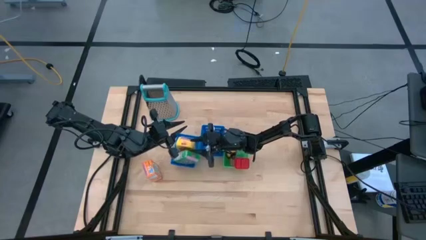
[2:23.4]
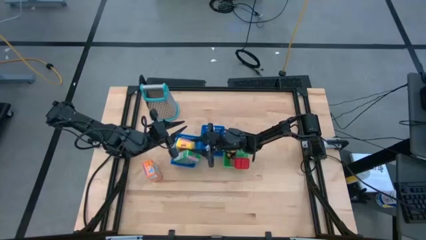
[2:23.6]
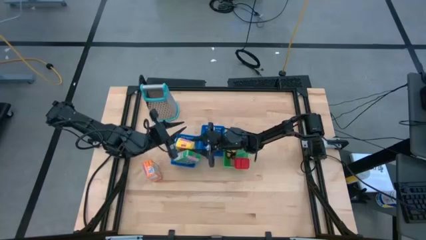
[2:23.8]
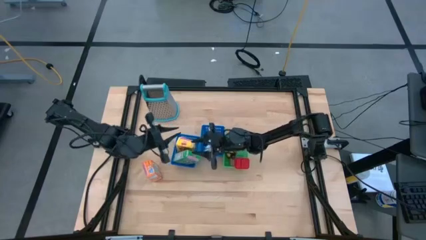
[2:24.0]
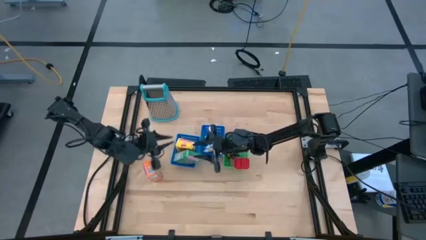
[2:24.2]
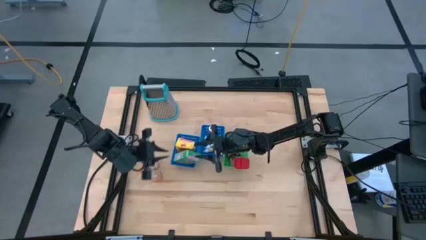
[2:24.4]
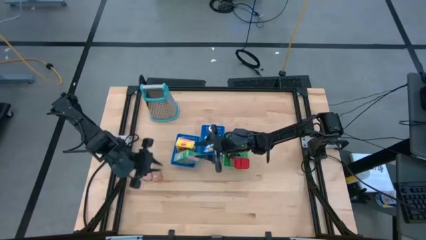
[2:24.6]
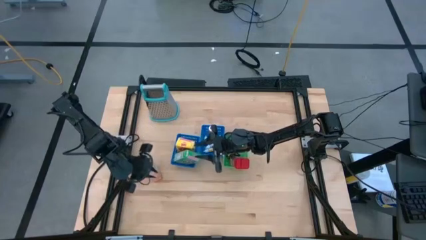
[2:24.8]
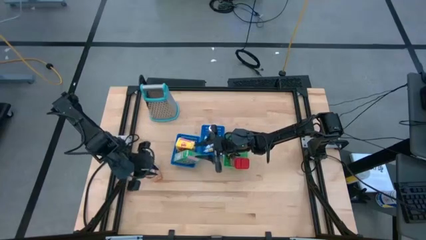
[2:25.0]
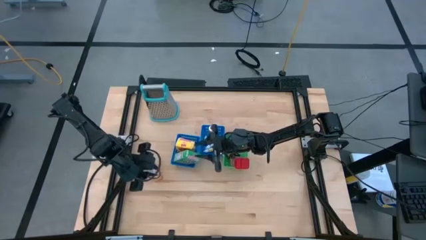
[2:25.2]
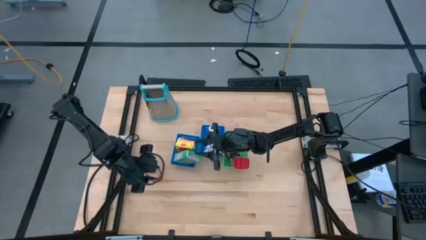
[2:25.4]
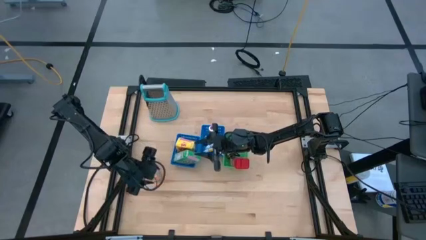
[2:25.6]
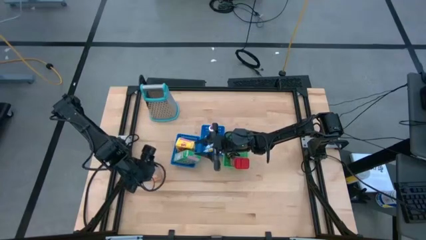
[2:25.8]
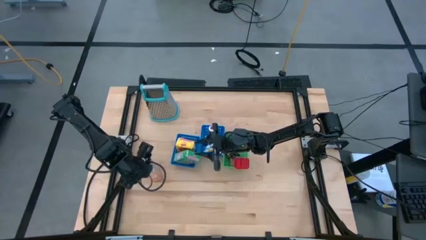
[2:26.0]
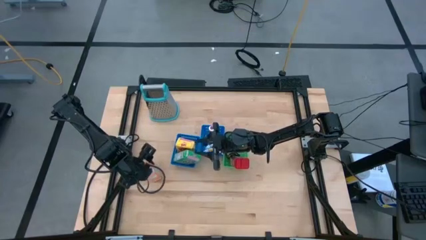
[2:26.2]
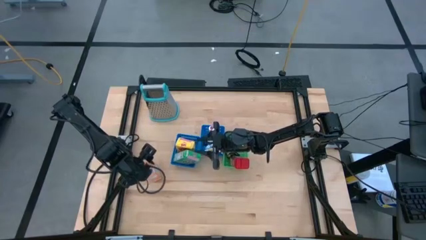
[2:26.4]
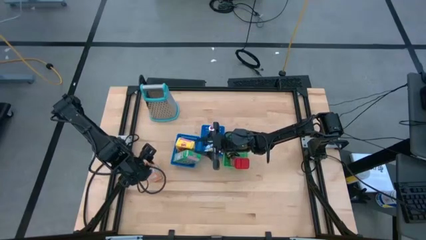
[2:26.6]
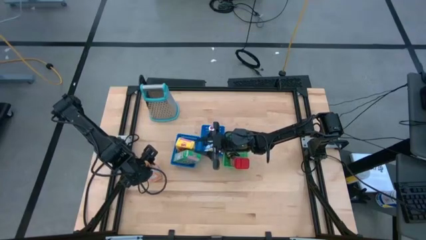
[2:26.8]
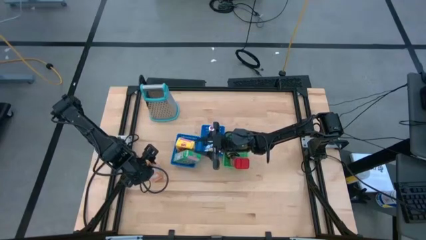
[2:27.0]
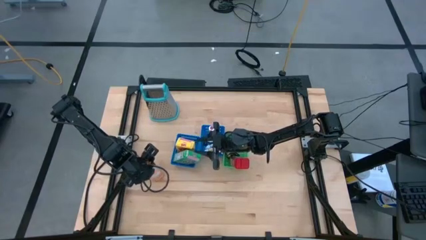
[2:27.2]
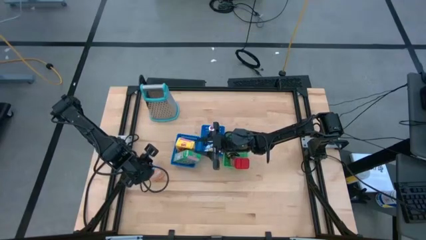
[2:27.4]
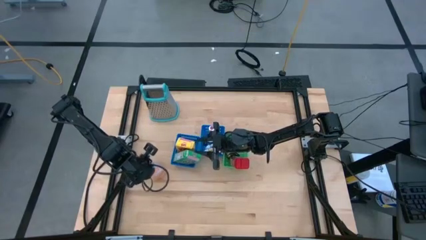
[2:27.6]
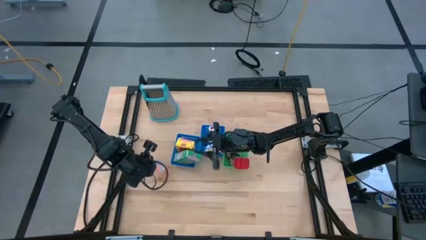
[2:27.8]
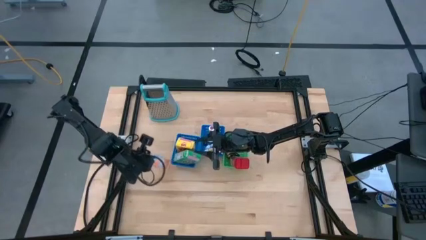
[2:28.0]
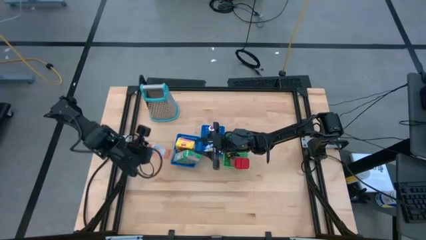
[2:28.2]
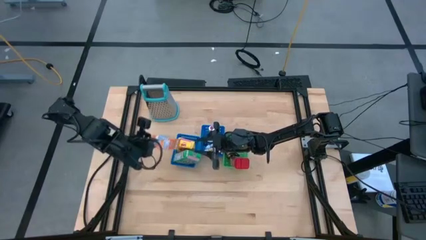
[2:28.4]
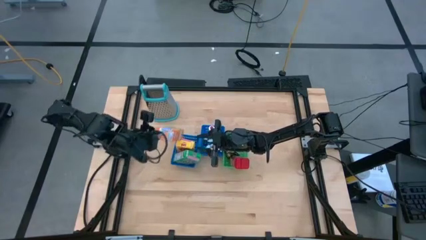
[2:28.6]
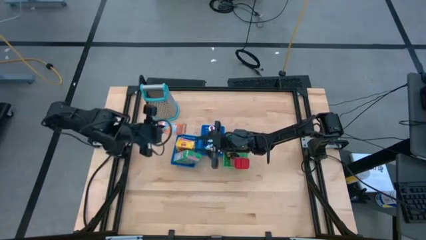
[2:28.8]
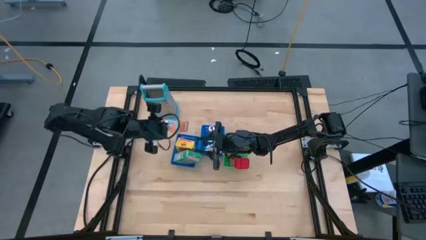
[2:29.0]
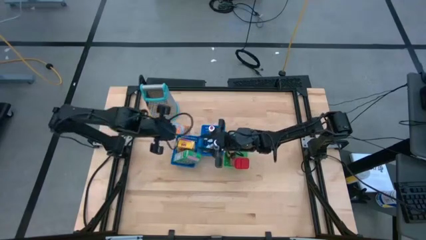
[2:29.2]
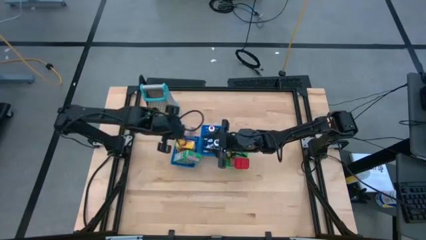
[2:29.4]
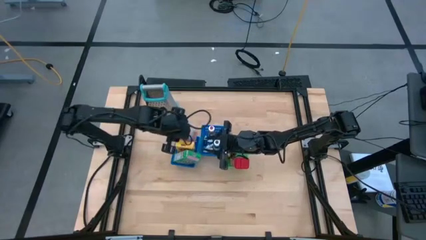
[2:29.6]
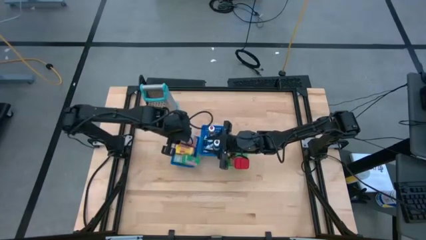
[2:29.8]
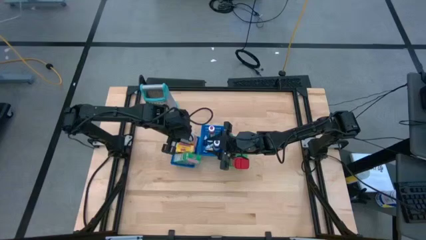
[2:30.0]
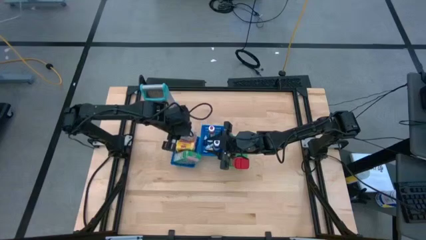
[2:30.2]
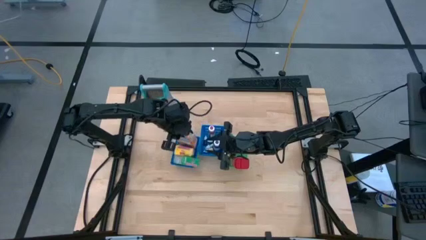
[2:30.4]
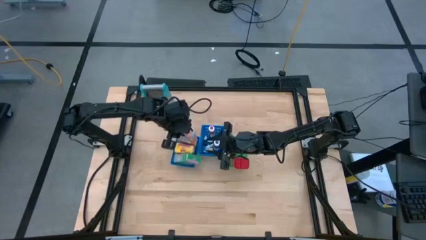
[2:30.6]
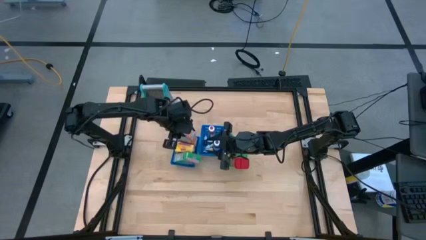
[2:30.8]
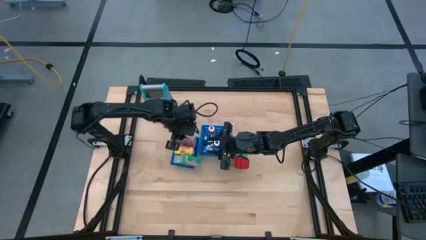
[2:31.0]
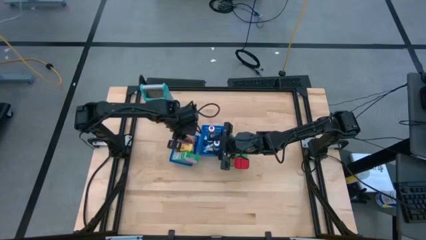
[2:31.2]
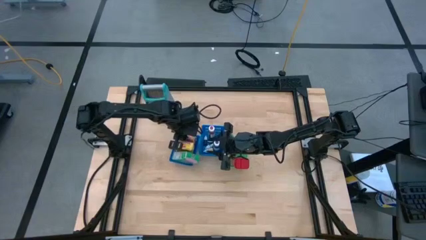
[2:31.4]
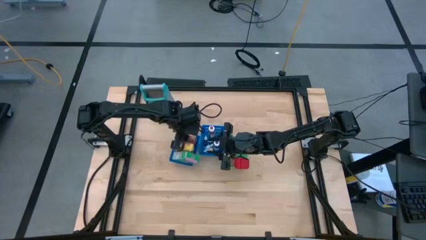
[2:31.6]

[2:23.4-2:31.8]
Task: Pick & Place Kitchen Items
Put the orange cereal box into the left blue bin

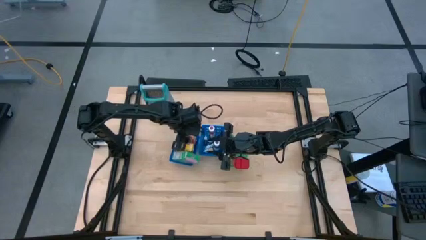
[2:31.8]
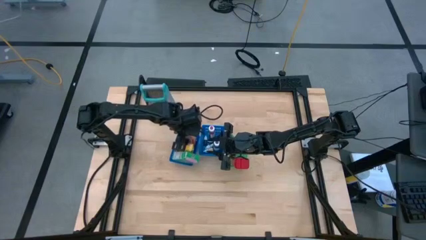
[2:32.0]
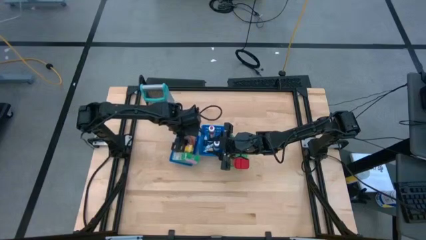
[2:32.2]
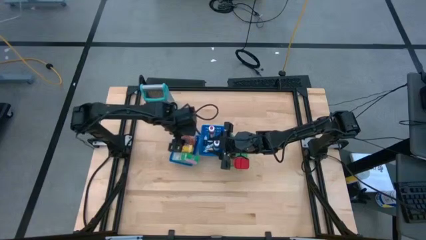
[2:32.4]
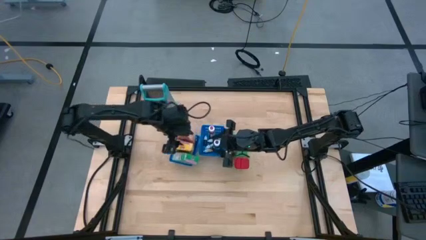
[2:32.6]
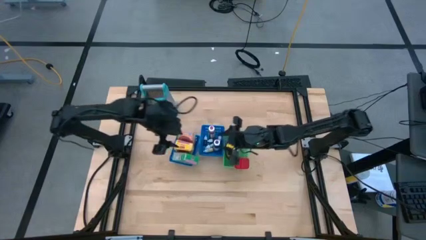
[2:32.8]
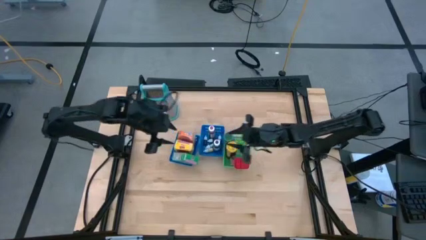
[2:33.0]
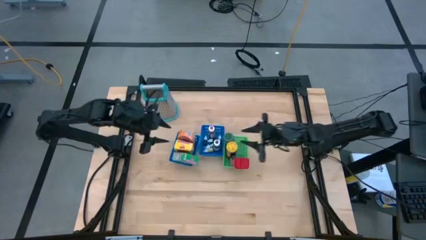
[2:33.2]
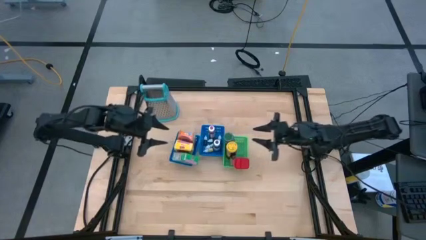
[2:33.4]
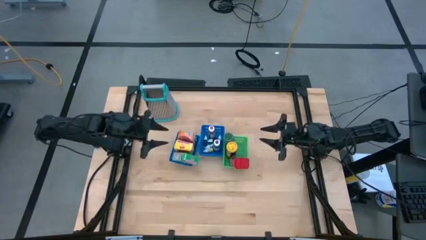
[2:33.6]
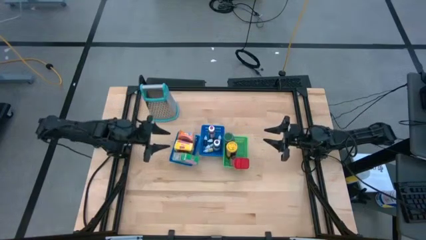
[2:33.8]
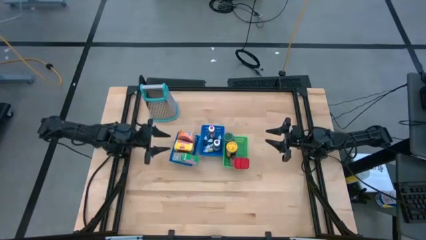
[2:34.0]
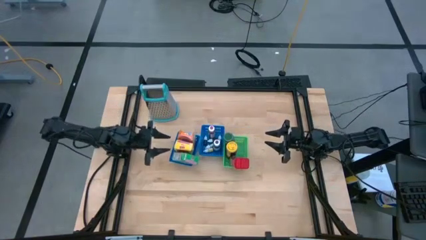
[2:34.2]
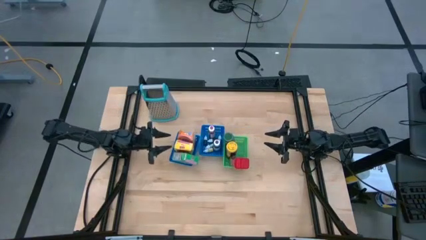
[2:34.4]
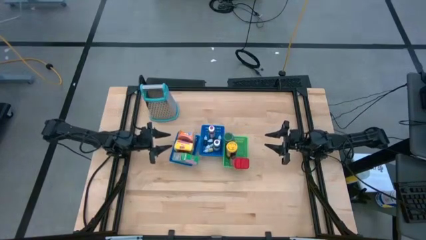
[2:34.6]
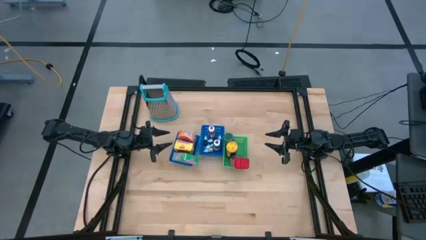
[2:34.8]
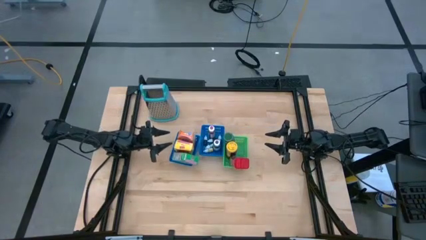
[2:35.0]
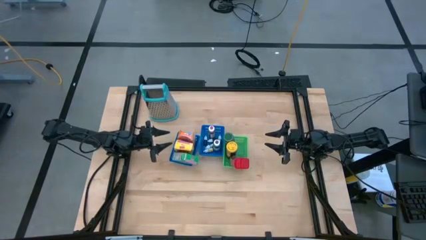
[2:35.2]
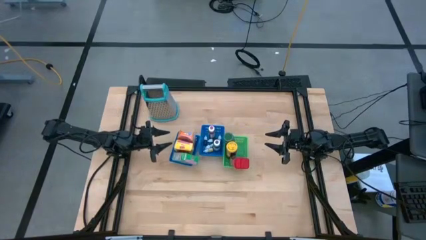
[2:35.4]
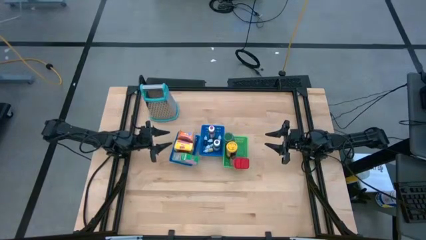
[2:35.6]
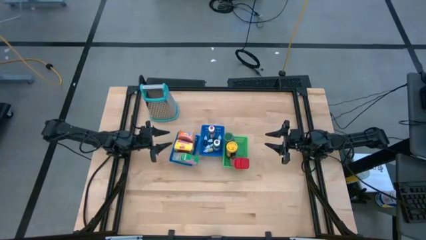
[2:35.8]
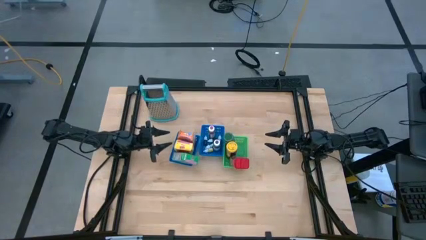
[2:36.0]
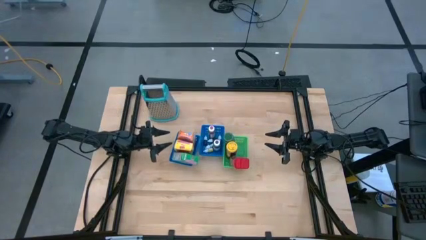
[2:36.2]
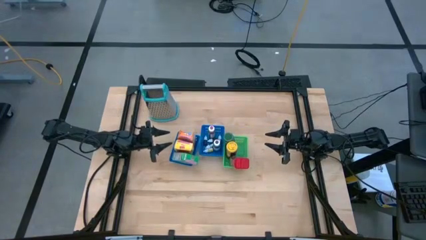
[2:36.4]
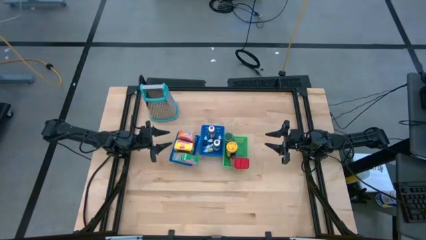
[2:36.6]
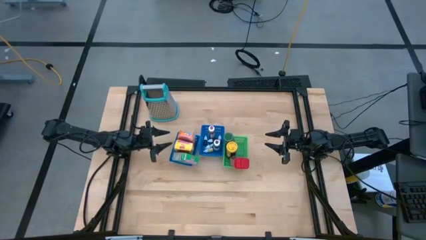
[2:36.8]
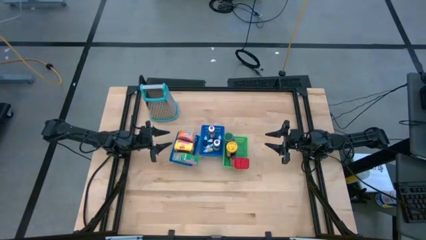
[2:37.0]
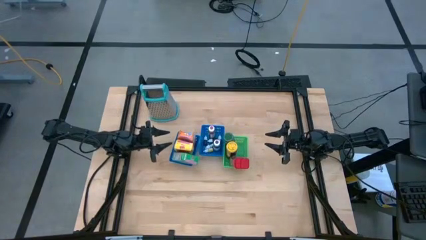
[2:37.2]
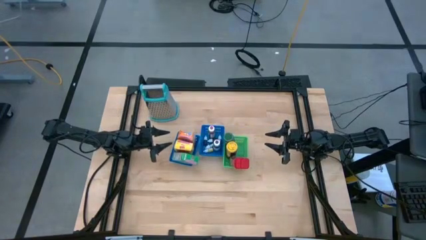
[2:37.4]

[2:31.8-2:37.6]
Return to Home Position
